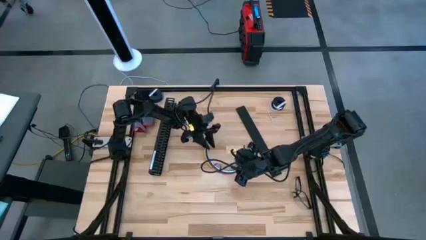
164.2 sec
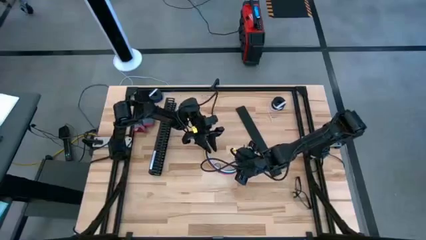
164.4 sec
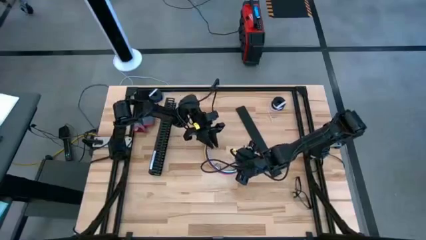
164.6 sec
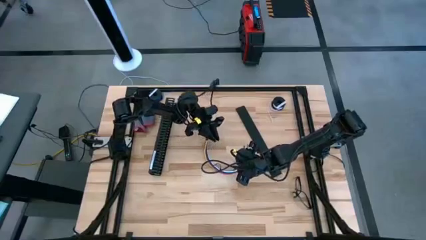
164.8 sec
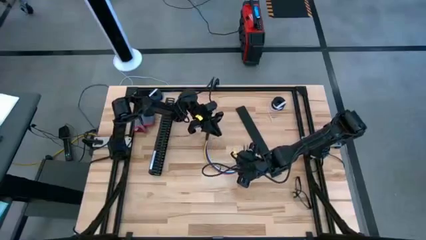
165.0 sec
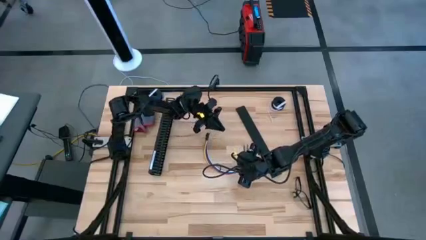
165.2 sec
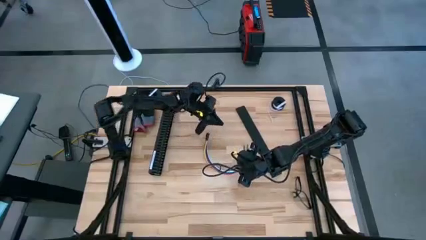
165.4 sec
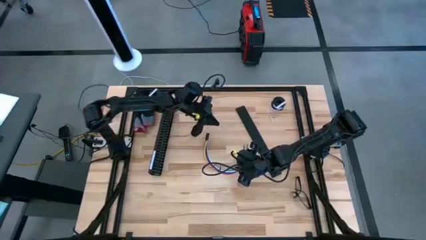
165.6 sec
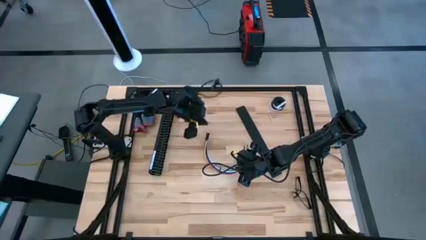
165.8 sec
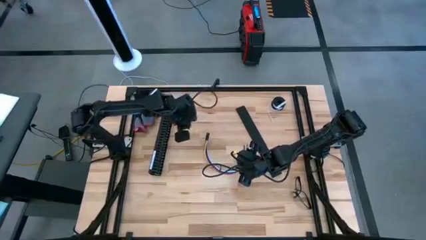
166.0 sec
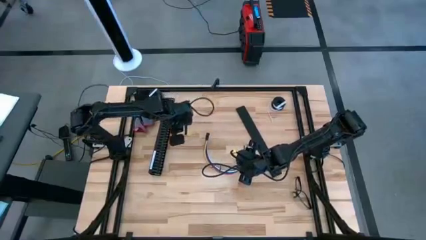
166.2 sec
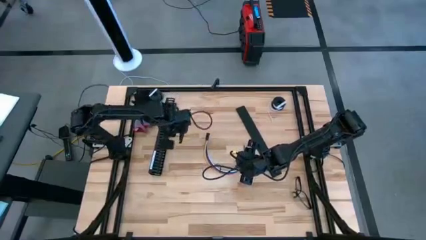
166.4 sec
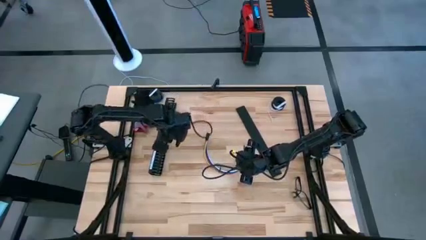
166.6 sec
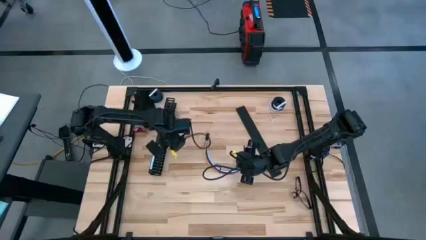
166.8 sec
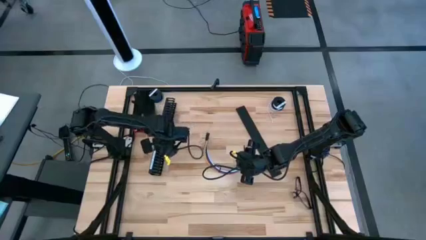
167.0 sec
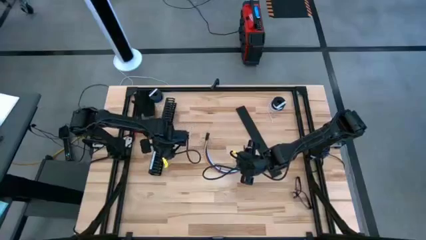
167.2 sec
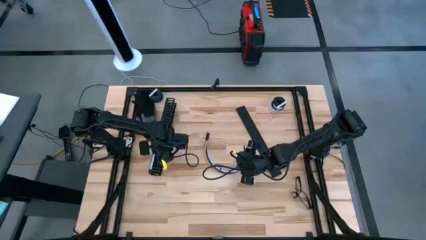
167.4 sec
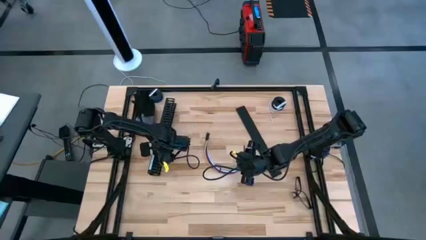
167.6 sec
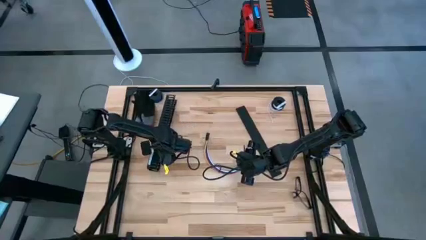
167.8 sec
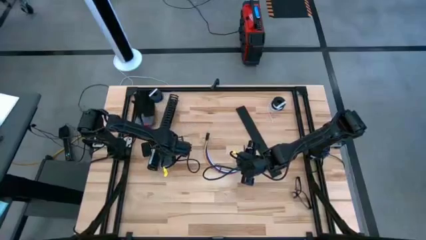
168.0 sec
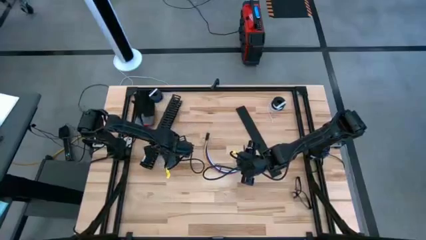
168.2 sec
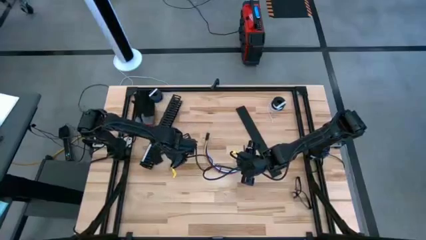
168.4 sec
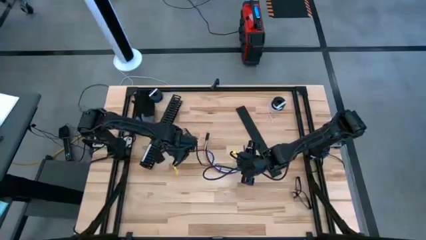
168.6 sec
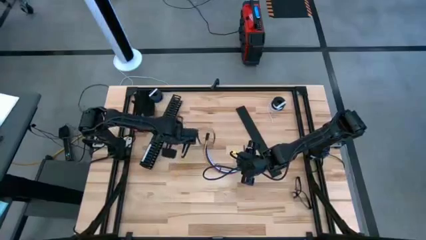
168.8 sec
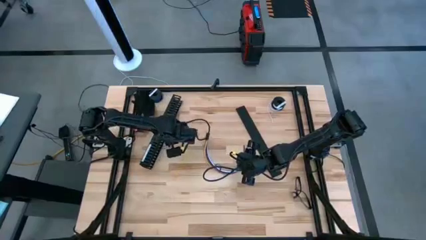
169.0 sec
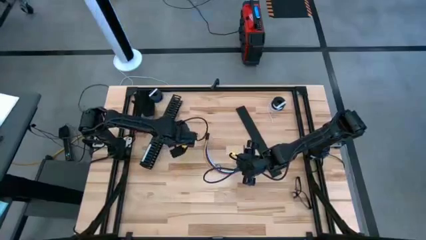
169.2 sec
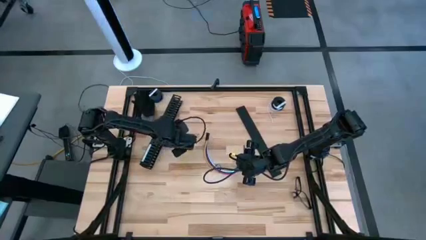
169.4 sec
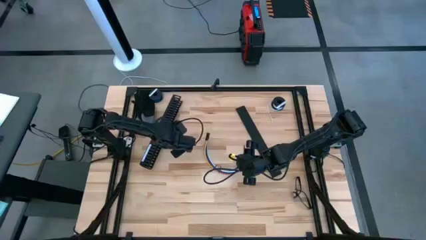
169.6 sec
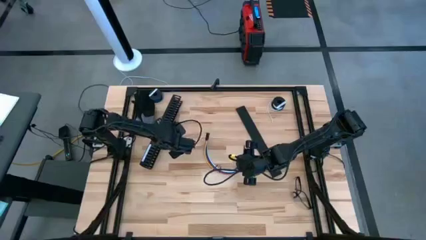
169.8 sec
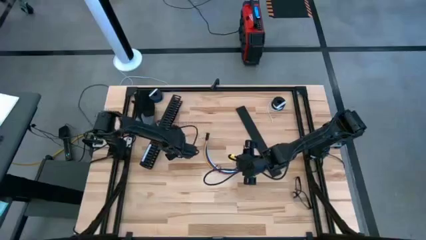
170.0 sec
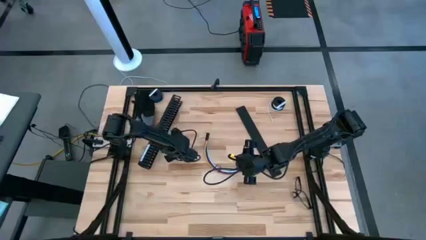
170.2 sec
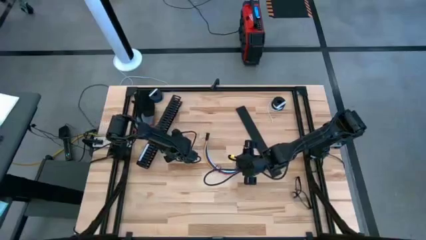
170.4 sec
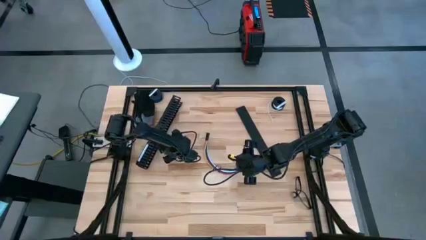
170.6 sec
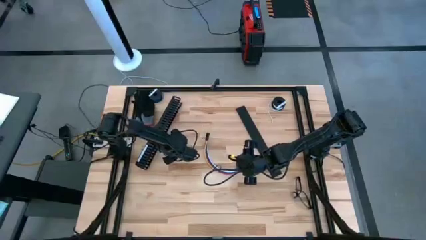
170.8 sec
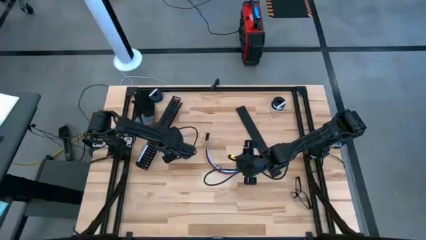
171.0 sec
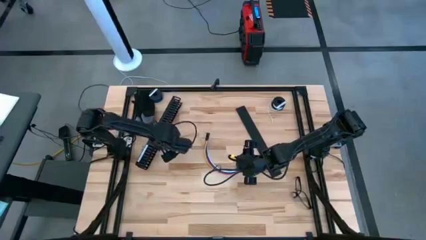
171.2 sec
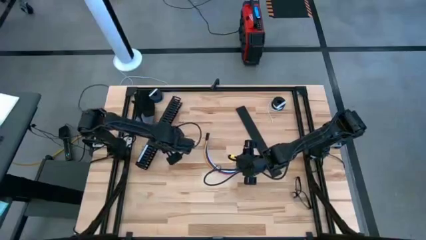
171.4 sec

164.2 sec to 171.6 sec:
Task: Ziptie cables
Put the zip tied cable into the black cable duct

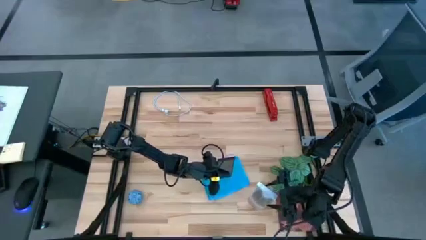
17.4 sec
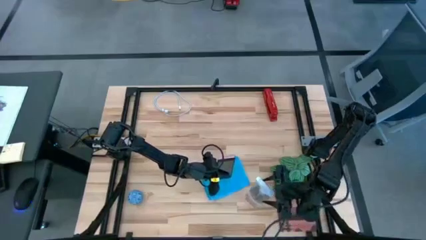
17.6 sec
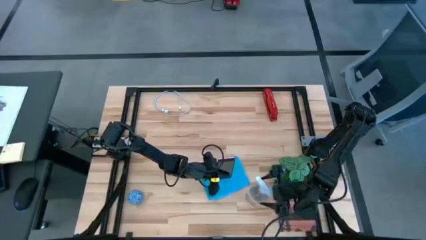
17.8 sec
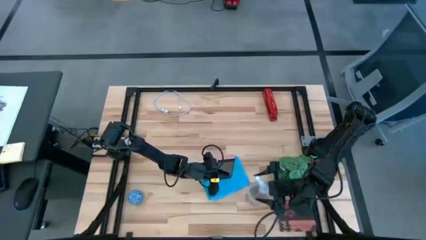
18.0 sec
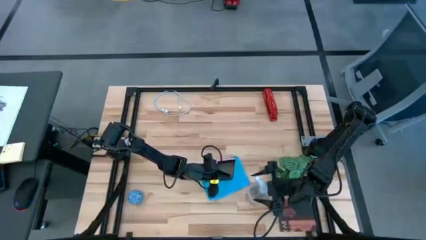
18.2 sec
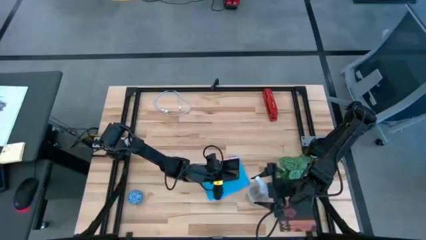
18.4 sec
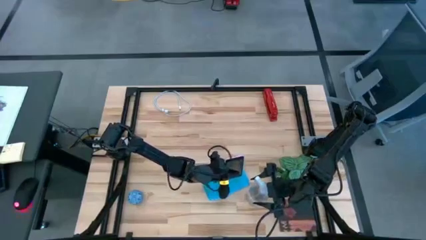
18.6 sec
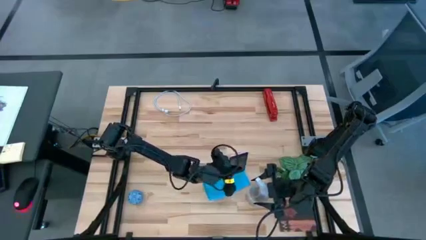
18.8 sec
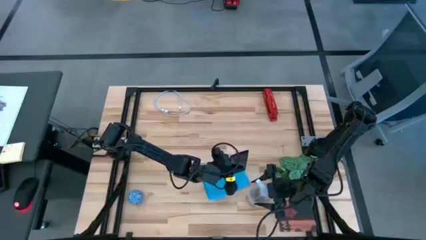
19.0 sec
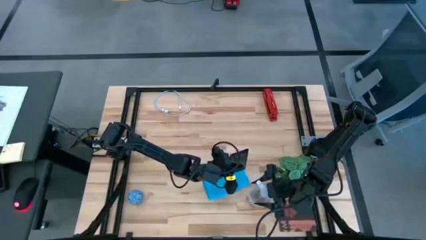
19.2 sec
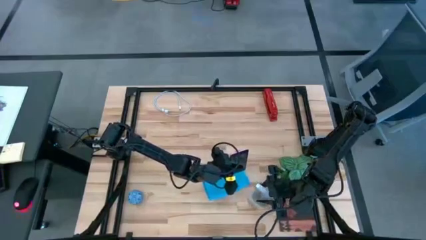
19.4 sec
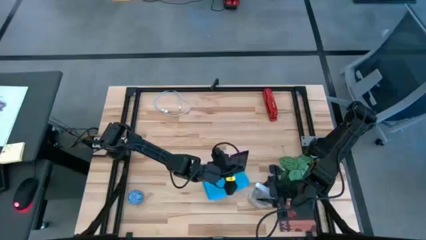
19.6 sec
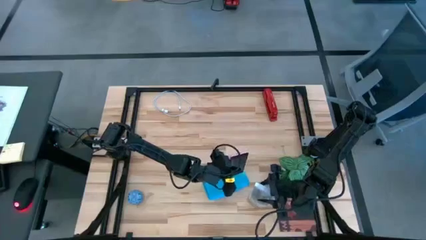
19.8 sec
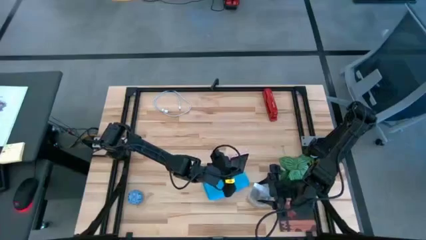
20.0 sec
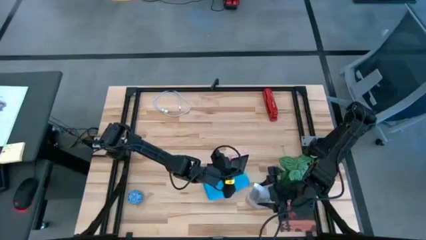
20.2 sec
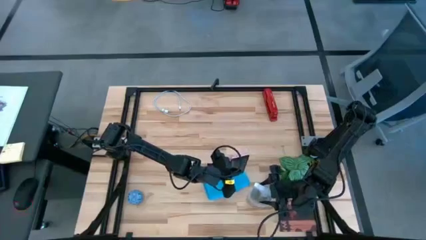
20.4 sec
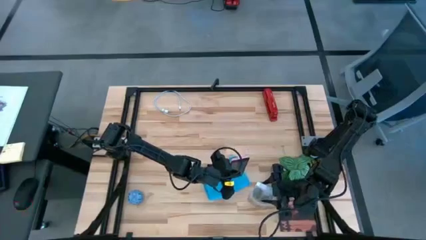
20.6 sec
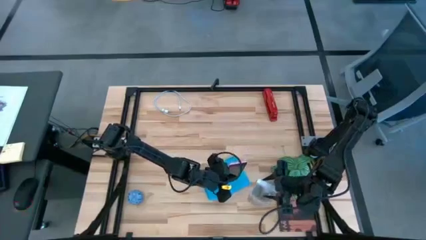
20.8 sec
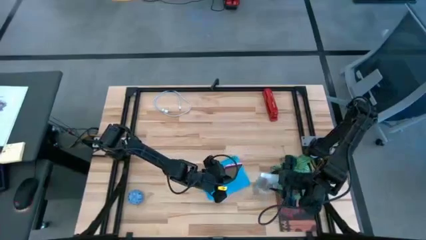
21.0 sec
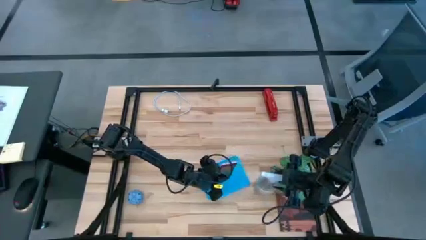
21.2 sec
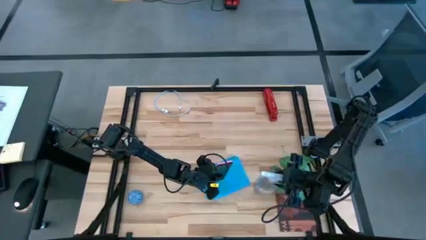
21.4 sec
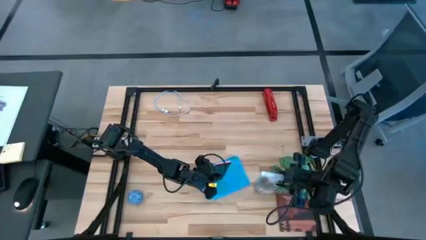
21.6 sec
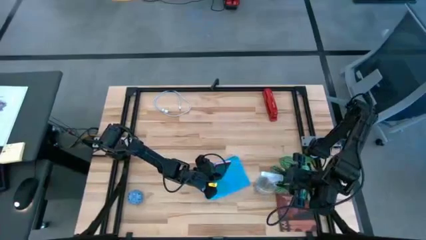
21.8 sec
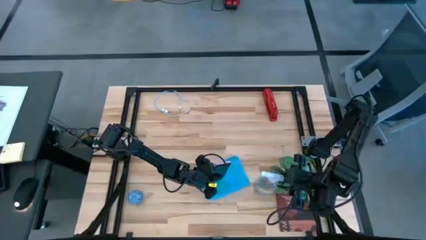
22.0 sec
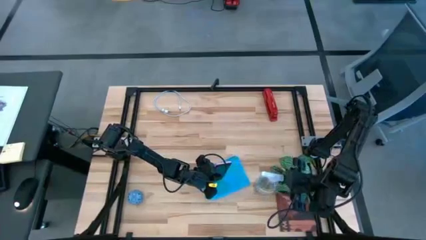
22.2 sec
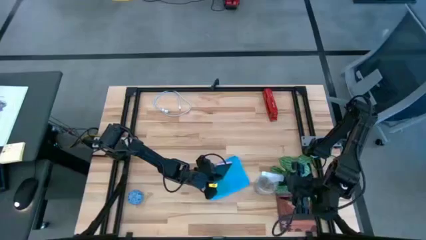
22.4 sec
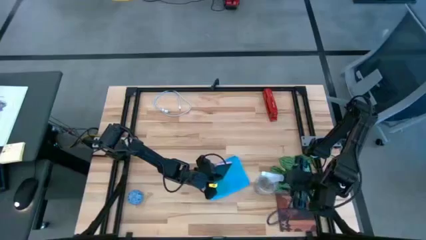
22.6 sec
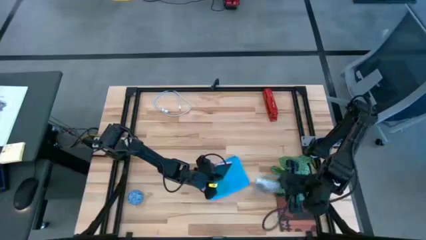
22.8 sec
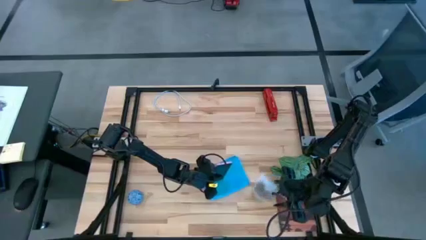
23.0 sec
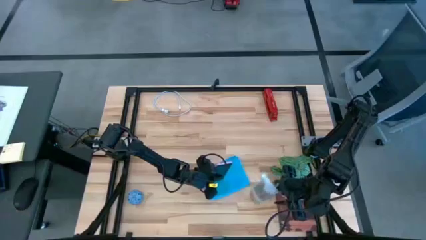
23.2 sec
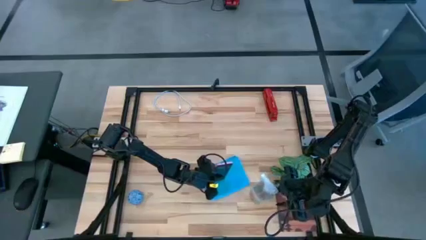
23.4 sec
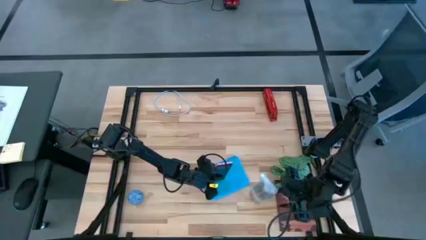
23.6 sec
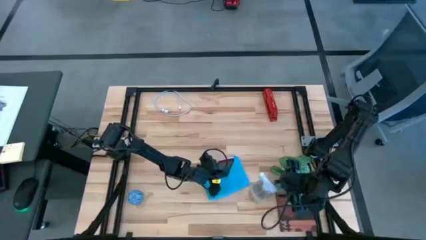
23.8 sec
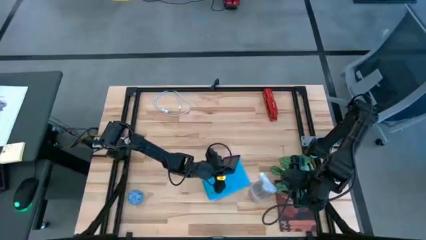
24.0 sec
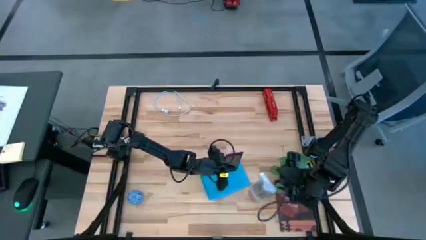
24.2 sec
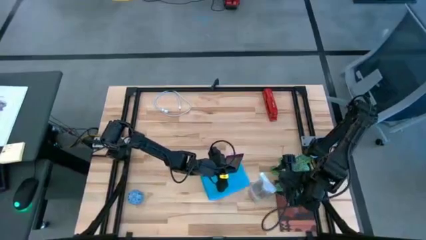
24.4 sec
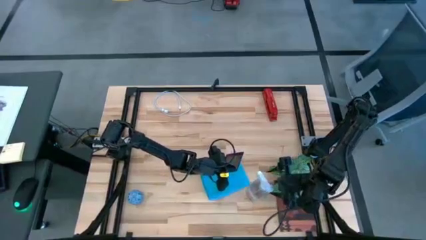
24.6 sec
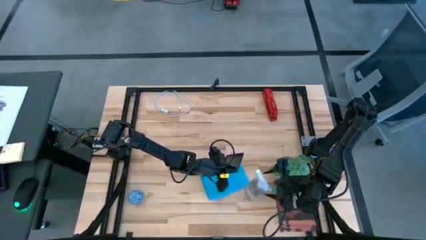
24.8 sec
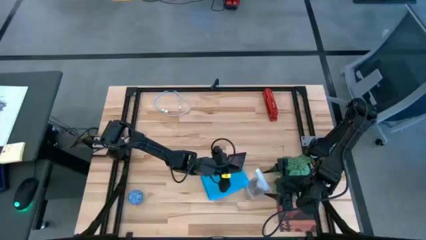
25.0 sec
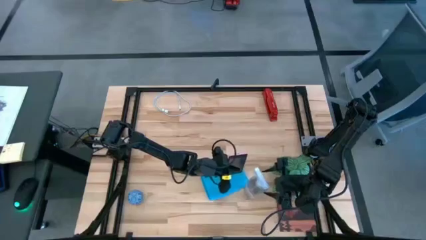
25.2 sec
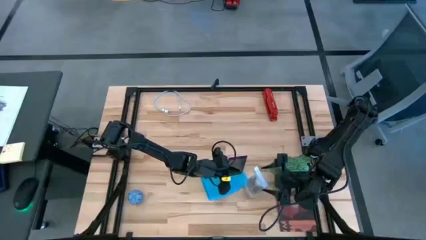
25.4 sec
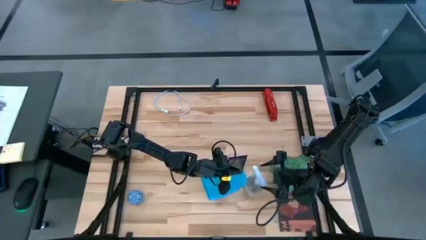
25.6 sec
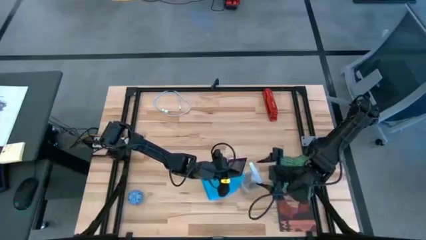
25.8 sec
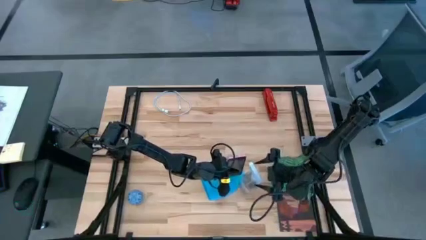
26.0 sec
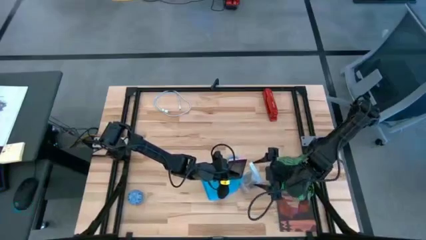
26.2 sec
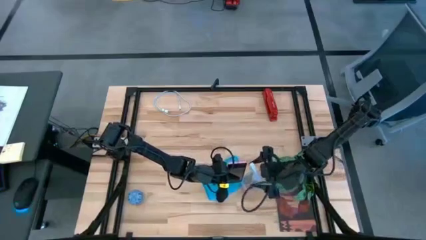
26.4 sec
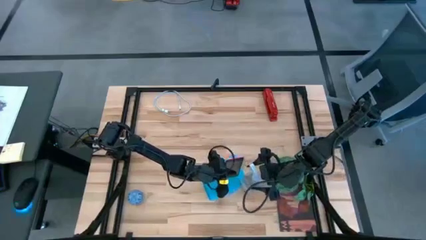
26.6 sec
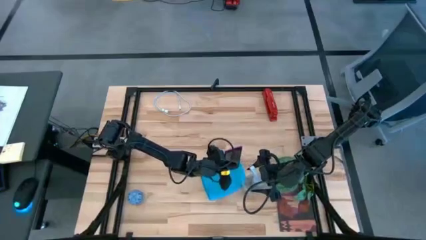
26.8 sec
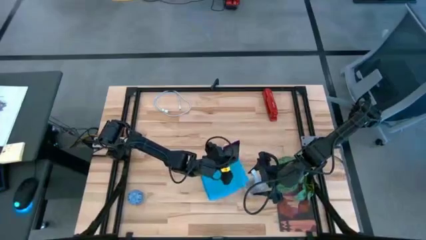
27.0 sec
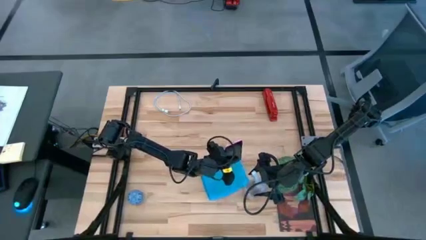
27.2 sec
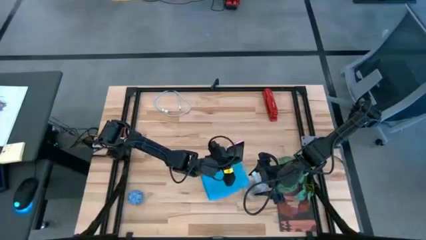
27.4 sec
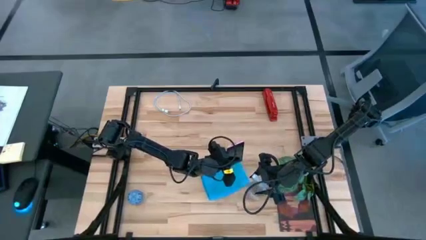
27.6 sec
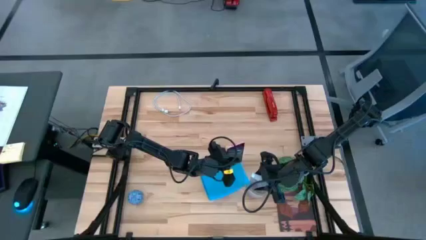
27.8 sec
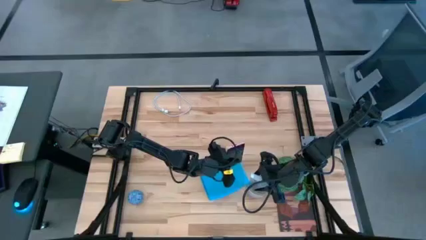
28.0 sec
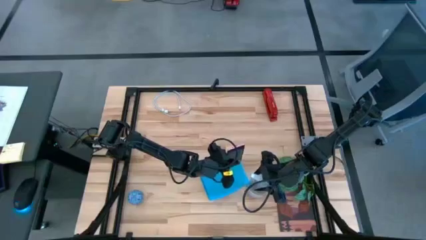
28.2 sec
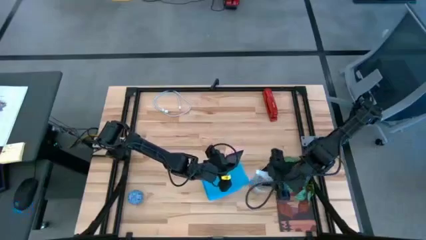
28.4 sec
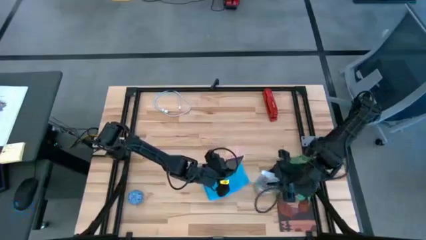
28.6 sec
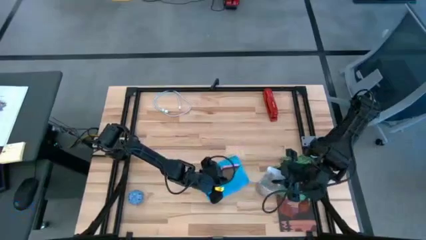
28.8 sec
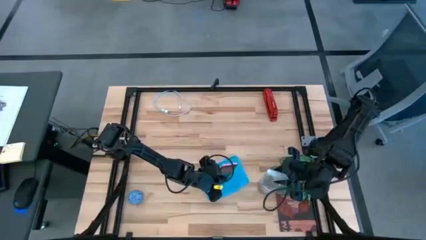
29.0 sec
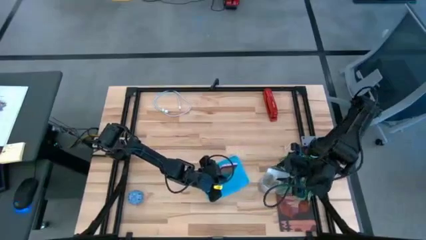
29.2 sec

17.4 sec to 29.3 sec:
Task: Apply microfiber cloth
Spray the front of the cellphone with the spray cleaning bottle
